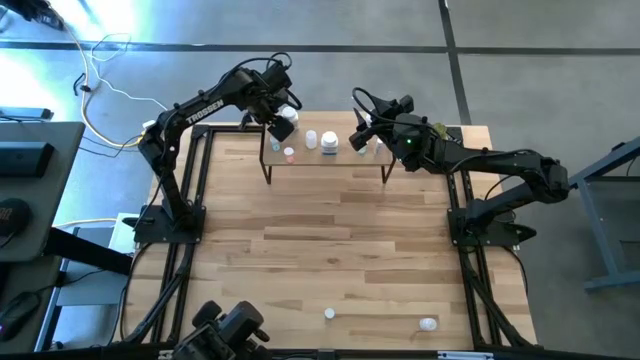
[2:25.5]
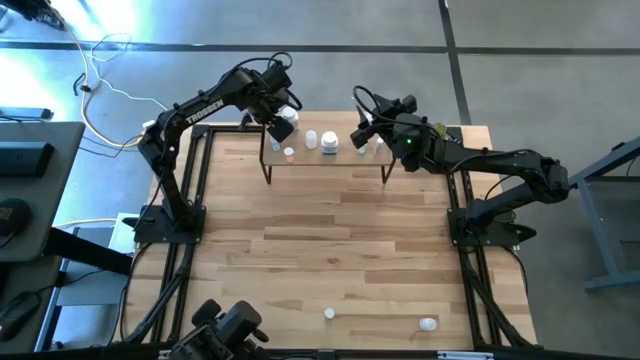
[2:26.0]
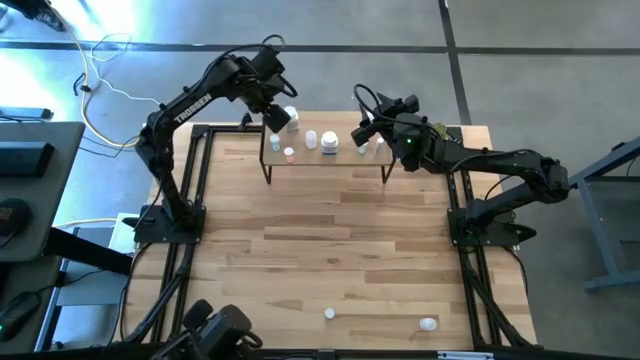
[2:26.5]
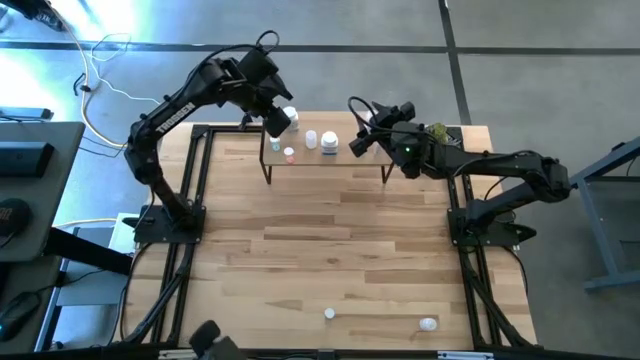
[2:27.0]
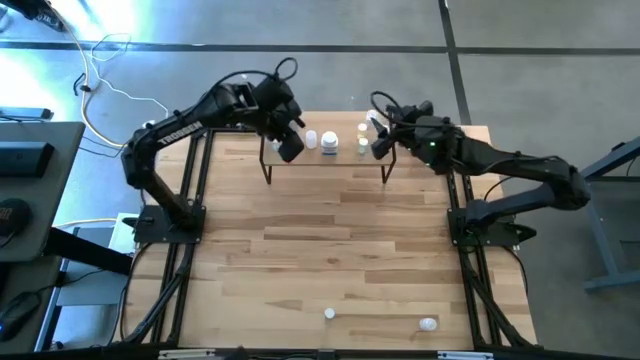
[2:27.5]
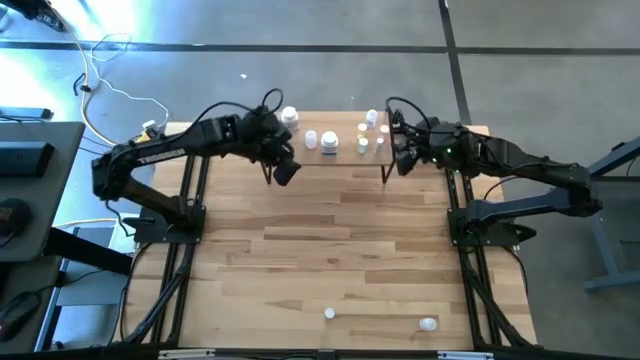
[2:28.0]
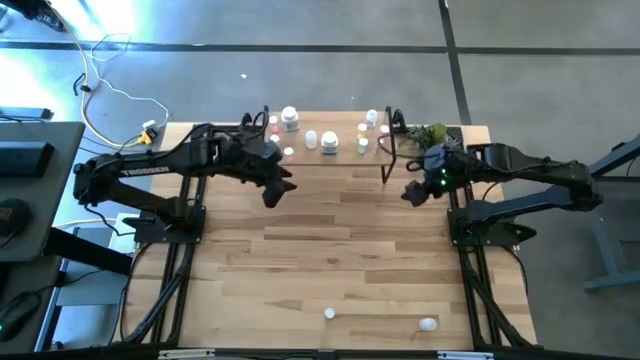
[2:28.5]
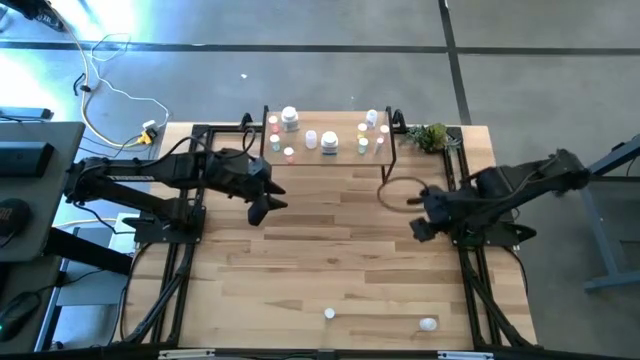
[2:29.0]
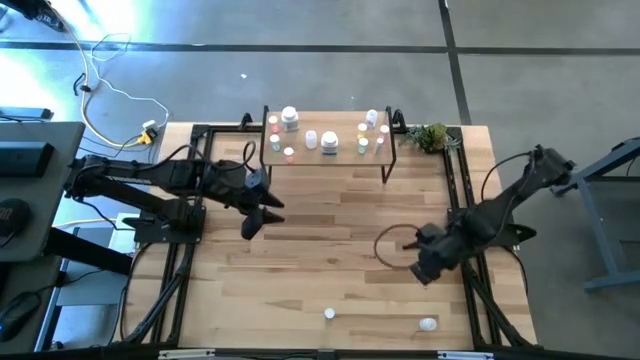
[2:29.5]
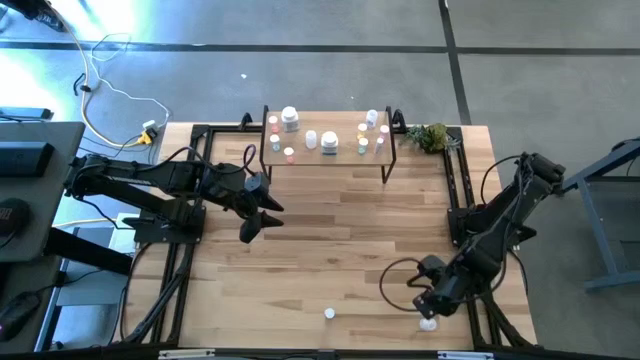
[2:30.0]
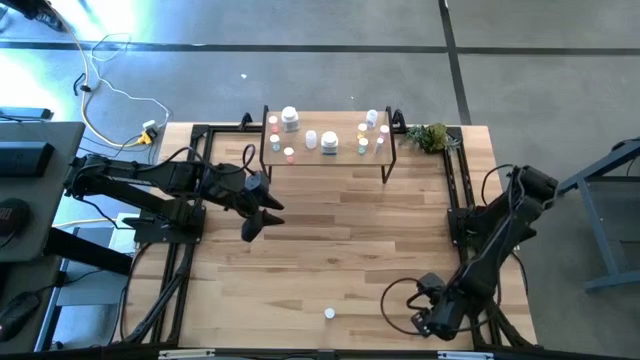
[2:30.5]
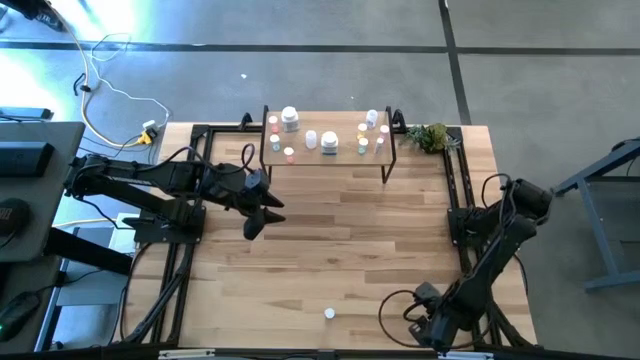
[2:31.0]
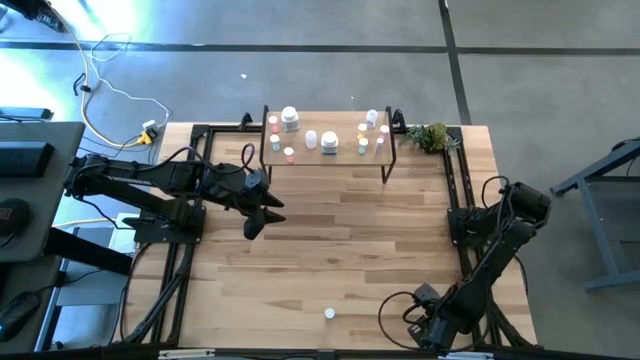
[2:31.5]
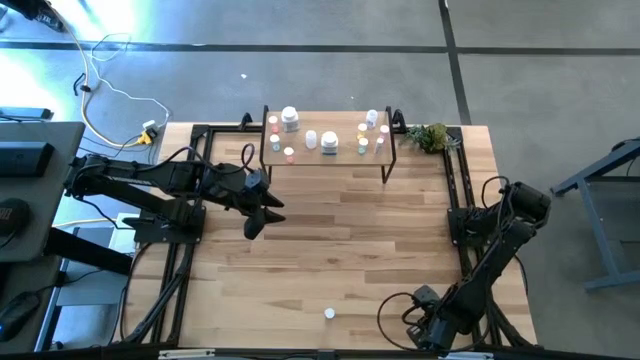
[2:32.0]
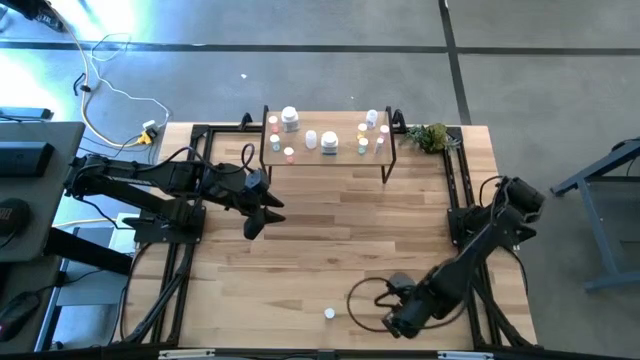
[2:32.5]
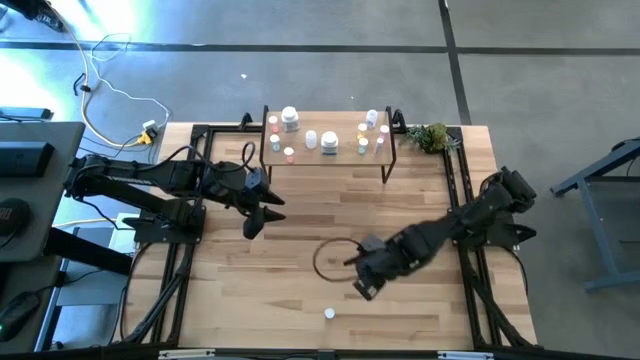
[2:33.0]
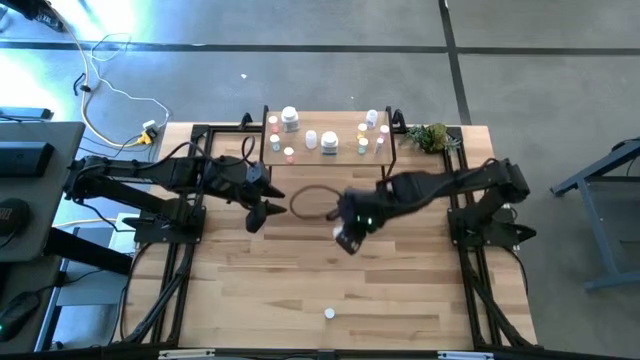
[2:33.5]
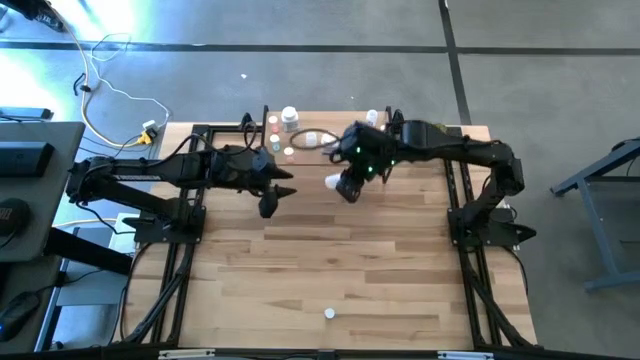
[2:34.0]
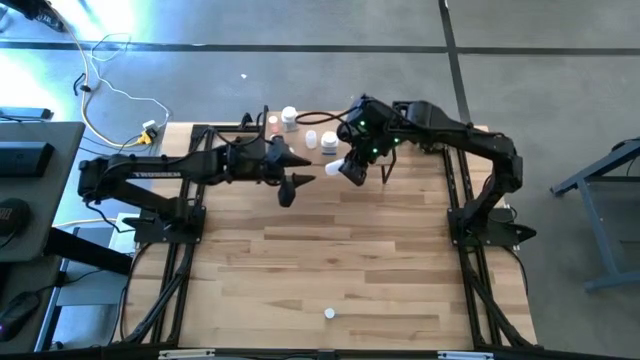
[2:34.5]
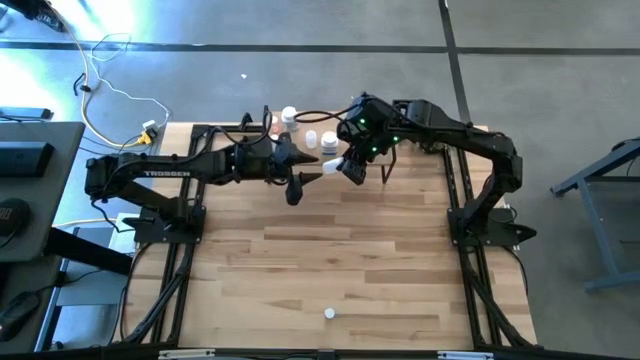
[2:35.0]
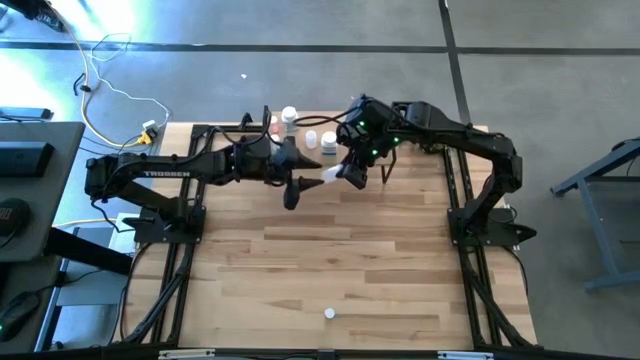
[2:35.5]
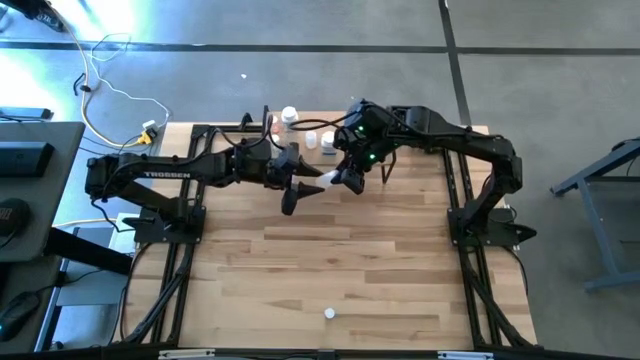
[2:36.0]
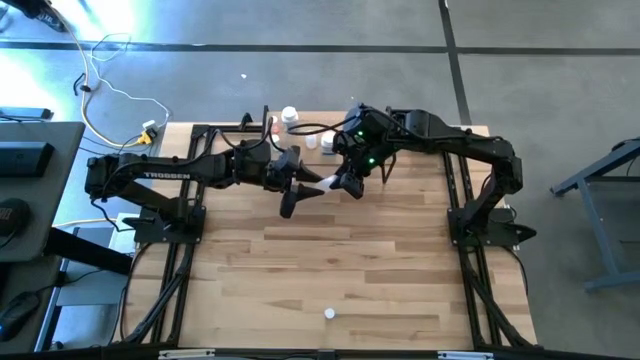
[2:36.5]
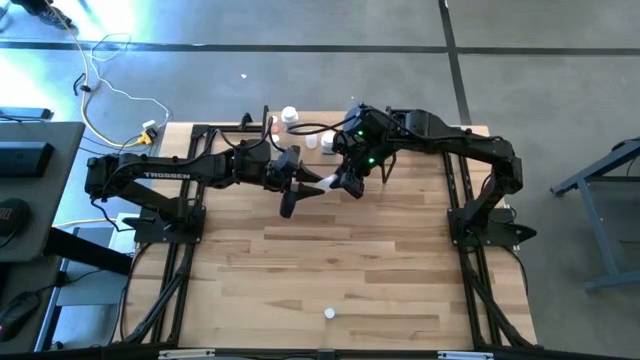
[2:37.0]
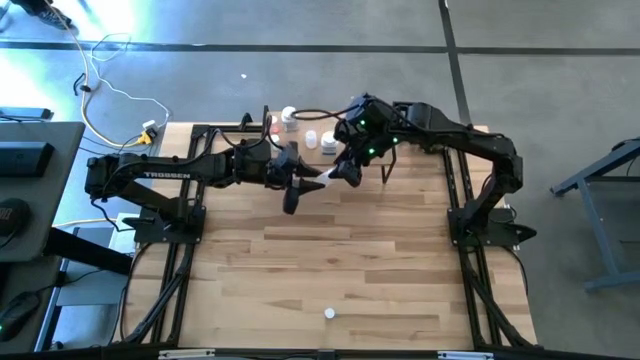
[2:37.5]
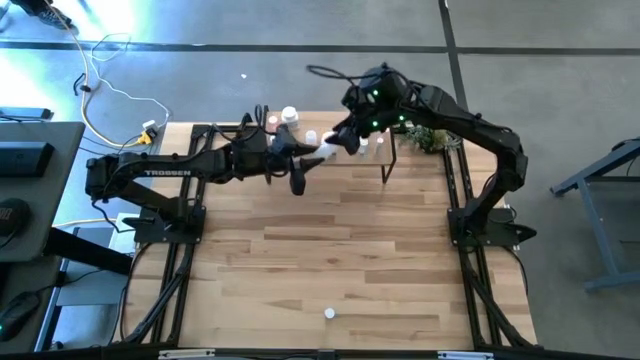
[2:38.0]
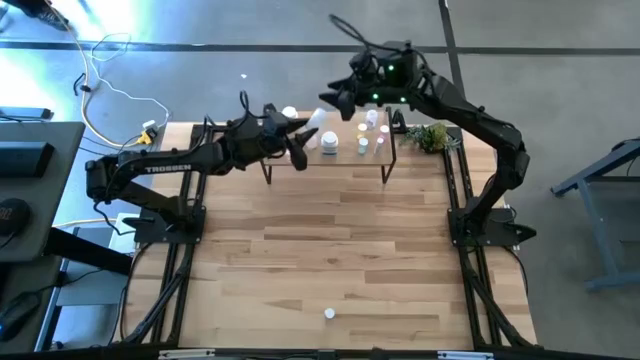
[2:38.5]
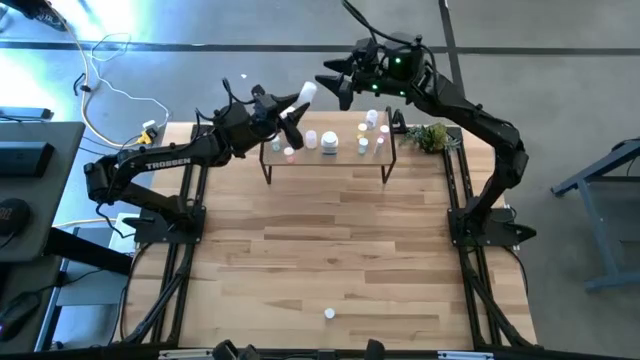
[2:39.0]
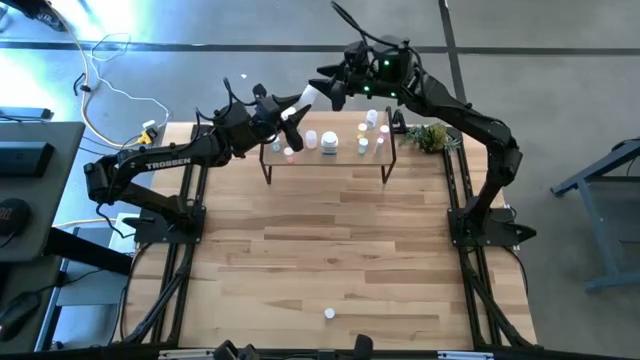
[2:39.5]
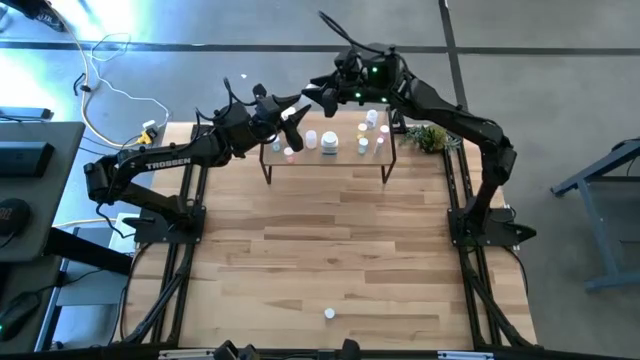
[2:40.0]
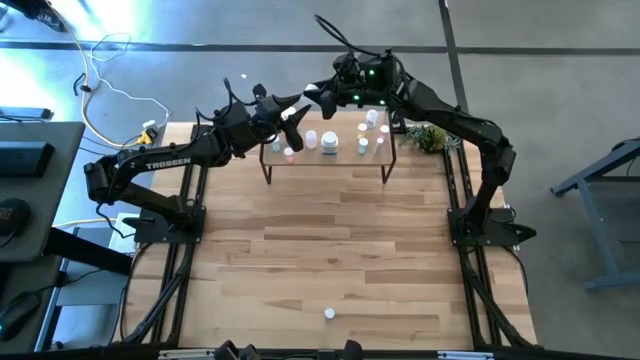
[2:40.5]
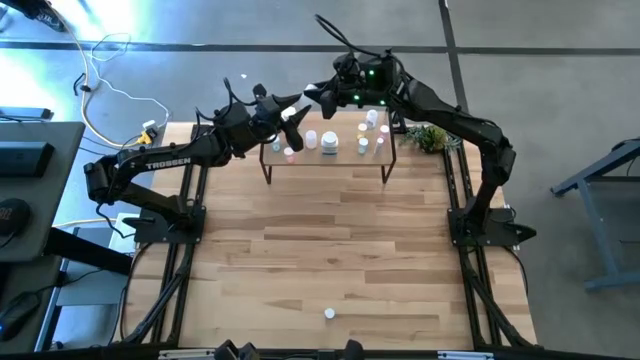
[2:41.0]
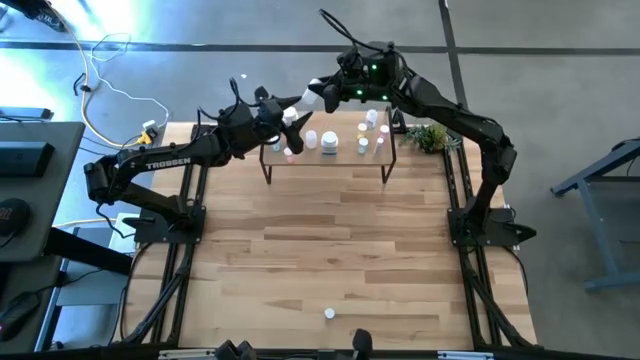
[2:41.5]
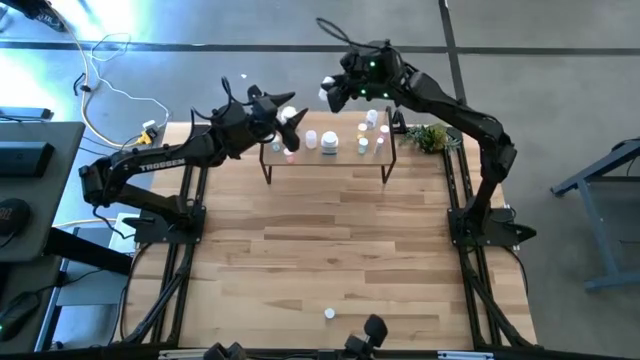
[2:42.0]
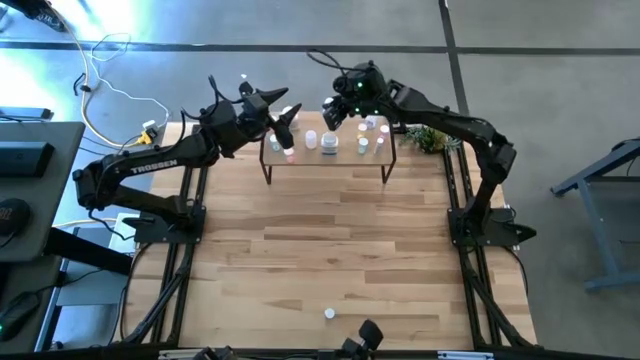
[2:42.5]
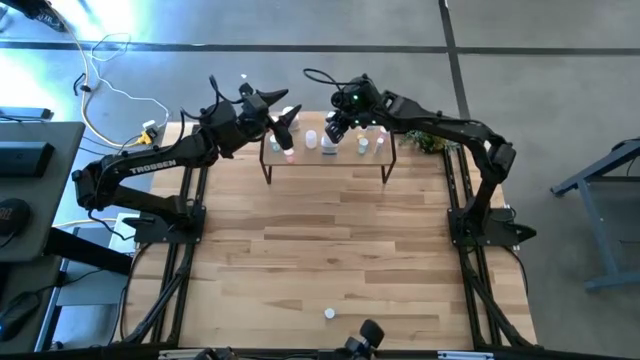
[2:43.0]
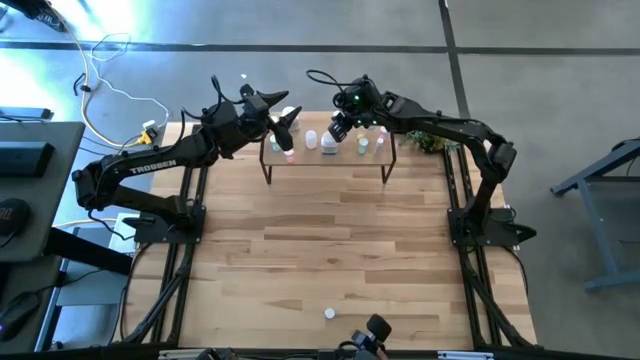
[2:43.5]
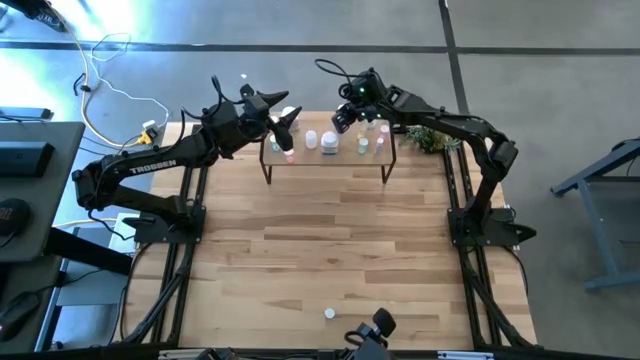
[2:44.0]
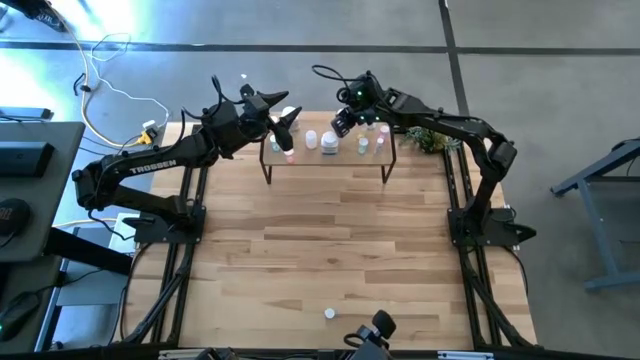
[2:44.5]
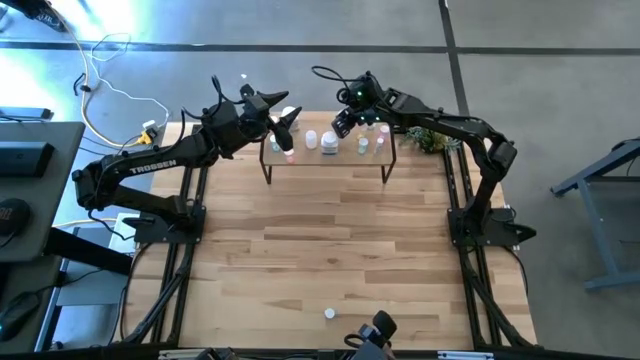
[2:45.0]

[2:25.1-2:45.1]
Task: Pick and place medicine bottles onto shelf by color
Put the transparent pill bottle on the shelf

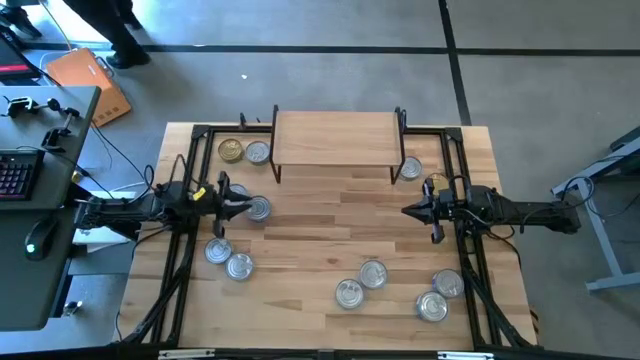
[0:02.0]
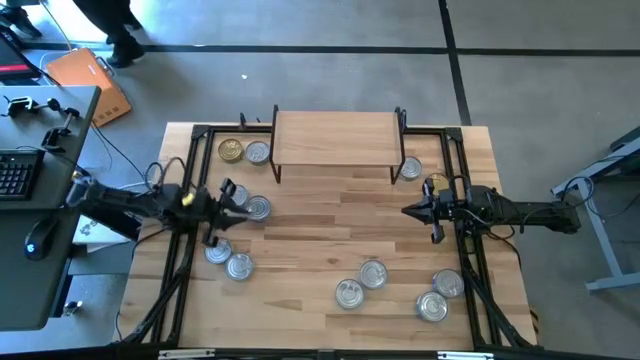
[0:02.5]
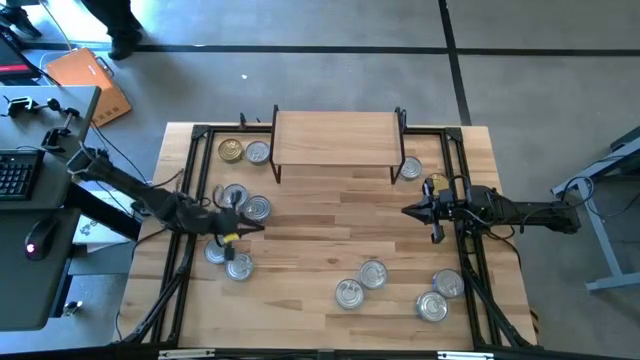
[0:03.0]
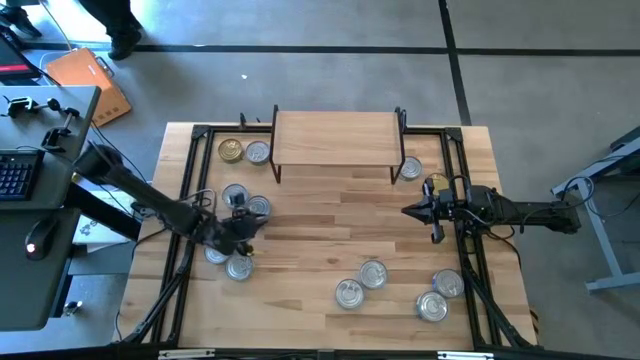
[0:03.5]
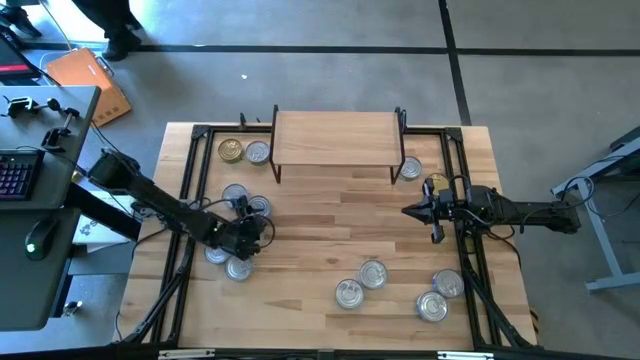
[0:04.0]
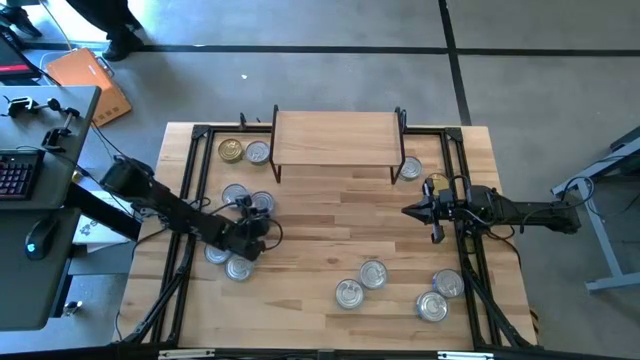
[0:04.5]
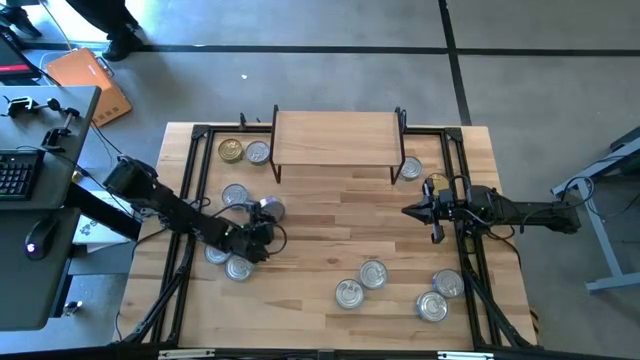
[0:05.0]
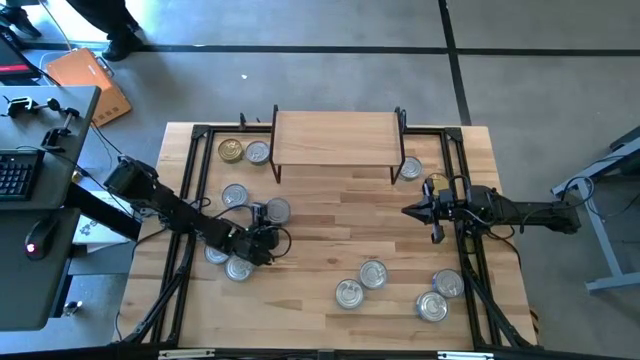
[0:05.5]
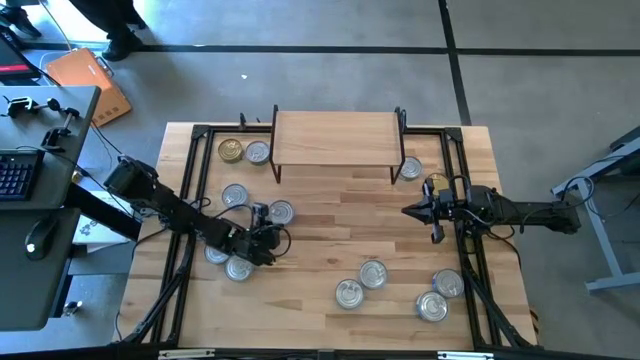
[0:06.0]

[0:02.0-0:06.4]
Task: Stack canned seafood by type on shelf
Put the blue tuna can on the shelf
